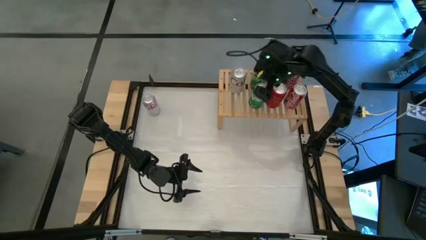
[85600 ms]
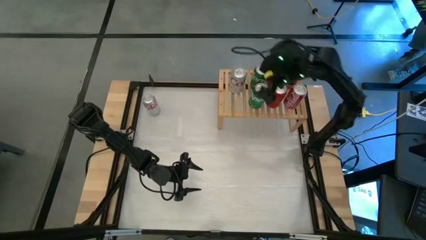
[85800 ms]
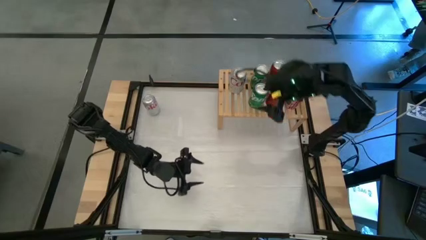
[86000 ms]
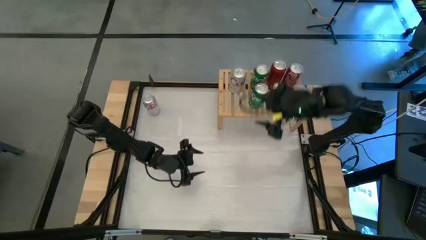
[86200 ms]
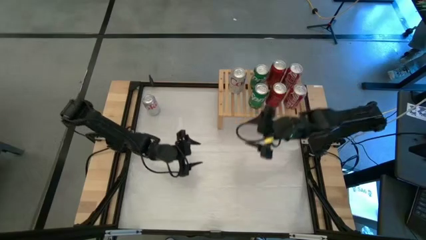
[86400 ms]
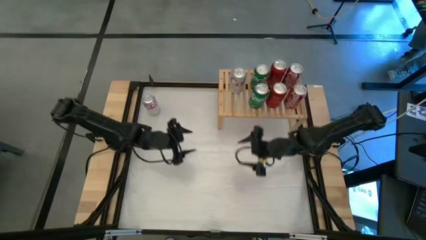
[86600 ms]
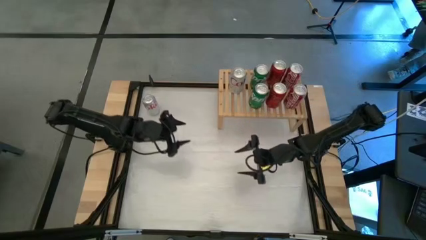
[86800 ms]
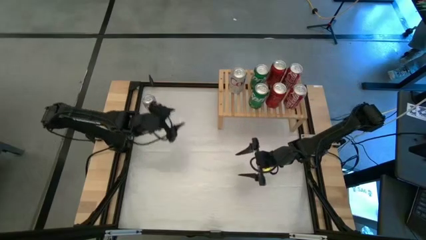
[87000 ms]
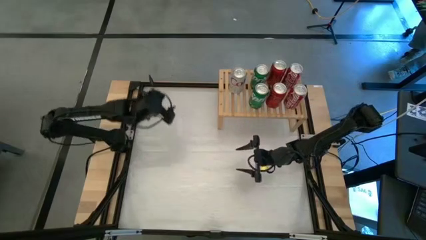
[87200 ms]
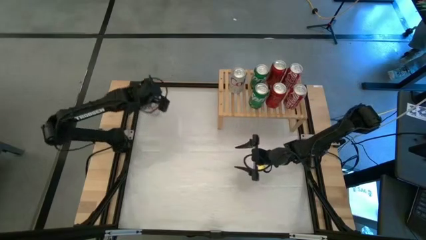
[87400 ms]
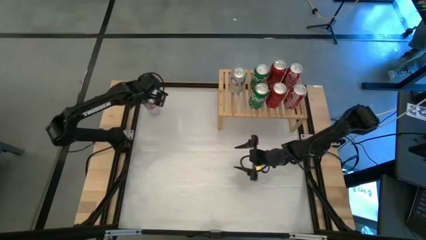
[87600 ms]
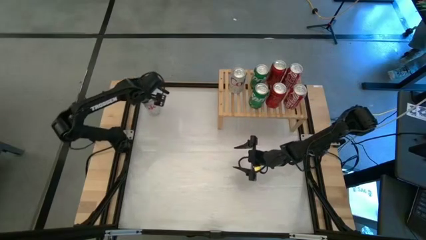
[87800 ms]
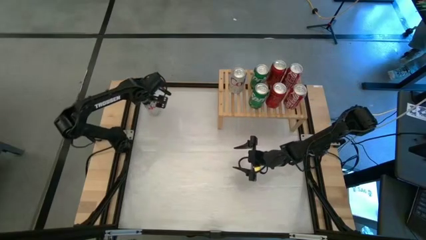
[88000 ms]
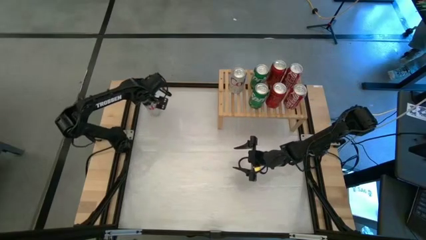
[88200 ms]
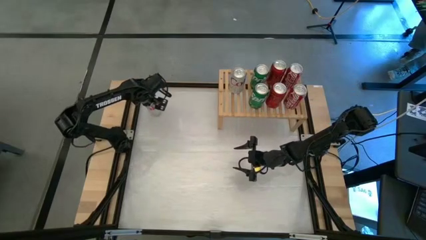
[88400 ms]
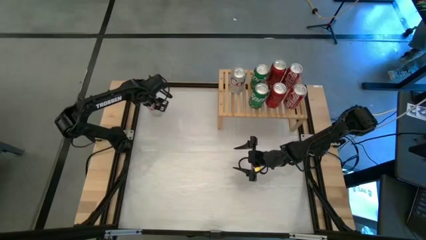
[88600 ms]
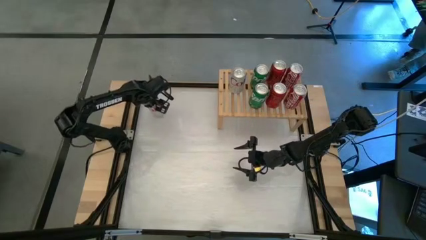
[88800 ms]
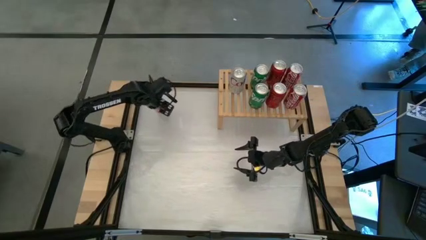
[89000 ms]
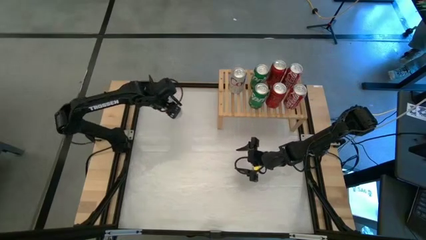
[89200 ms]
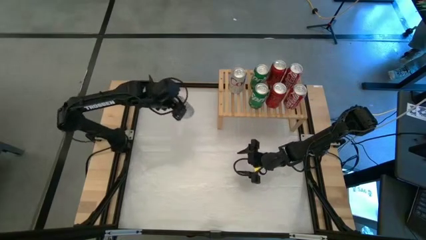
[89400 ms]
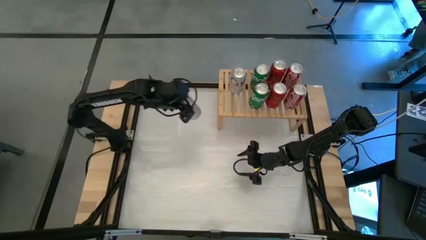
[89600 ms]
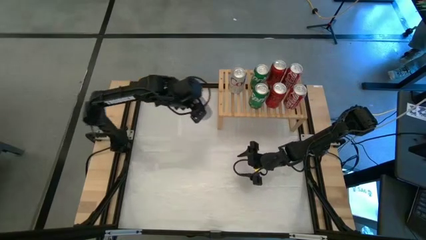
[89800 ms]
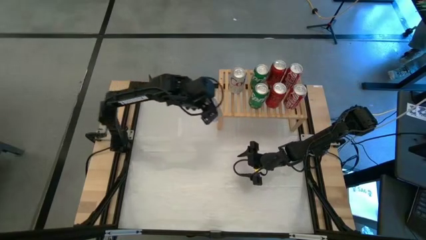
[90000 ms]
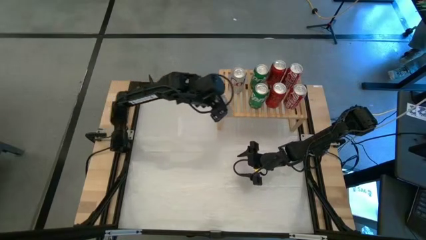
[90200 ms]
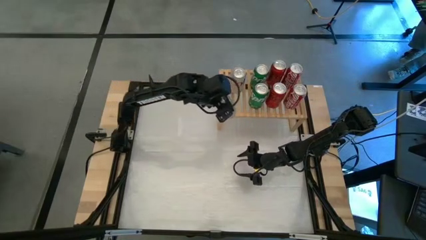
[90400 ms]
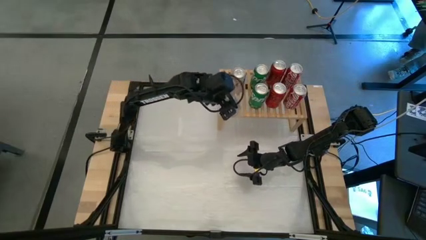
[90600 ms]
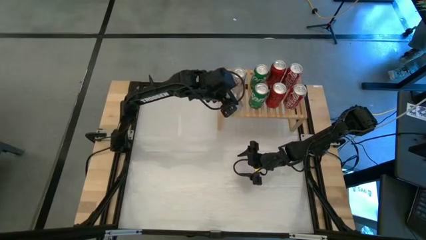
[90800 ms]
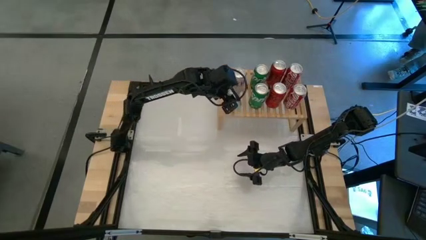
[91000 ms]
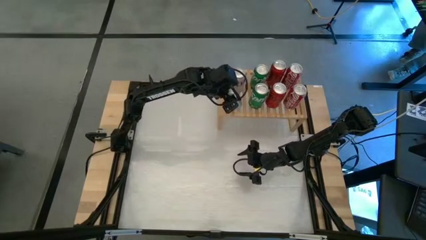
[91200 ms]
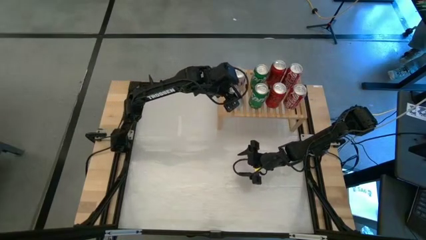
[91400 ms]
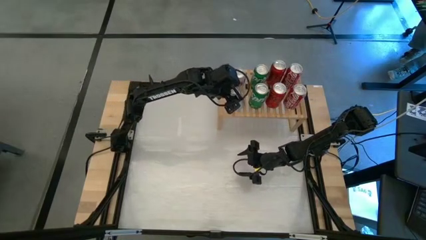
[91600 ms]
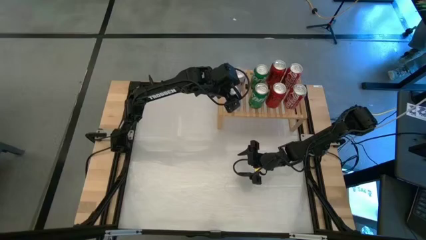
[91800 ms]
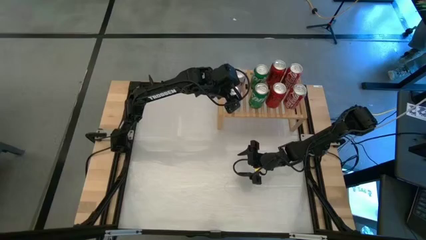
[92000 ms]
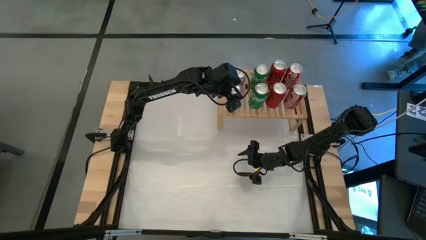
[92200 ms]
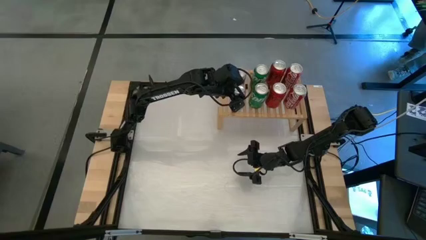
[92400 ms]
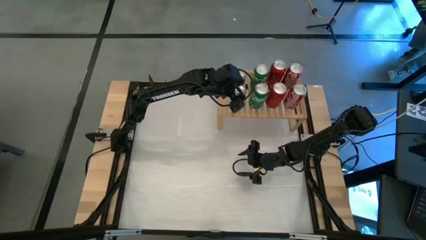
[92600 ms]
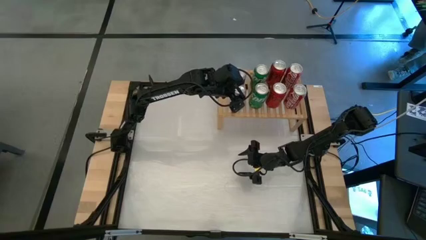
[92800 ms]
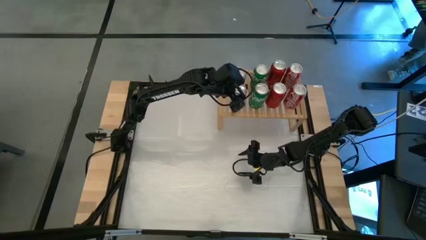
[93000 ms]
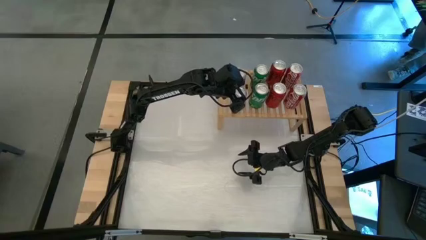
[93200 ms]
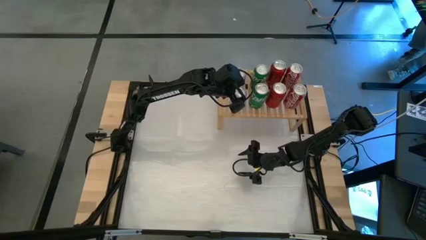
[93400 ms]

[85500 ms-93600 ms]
Task: Place canned beverage on shelf
Put the silver soda can on the shelf aligned with the other silver soda can

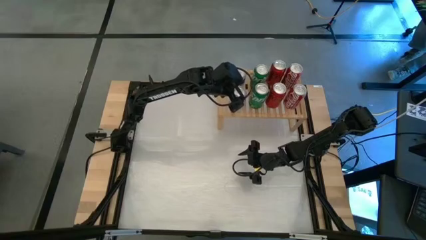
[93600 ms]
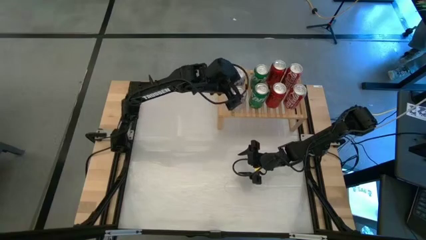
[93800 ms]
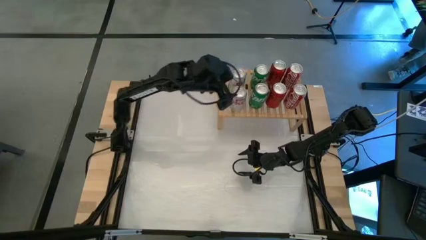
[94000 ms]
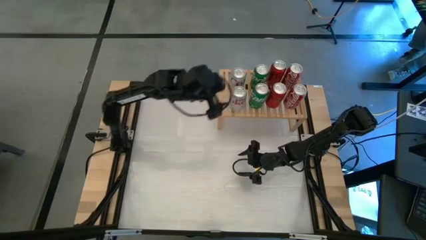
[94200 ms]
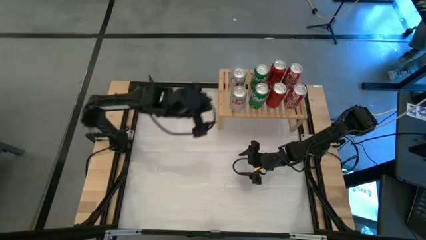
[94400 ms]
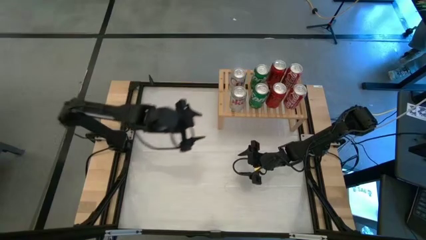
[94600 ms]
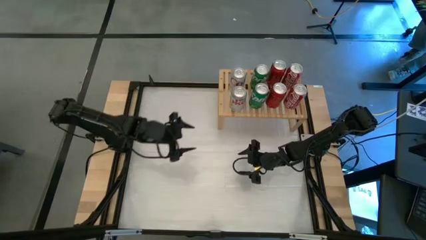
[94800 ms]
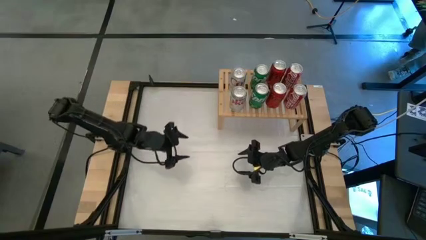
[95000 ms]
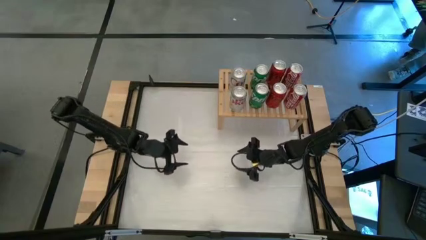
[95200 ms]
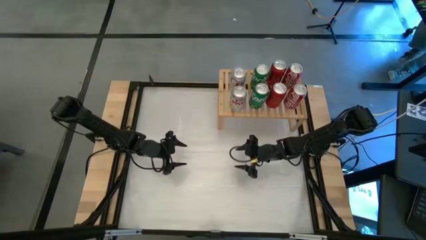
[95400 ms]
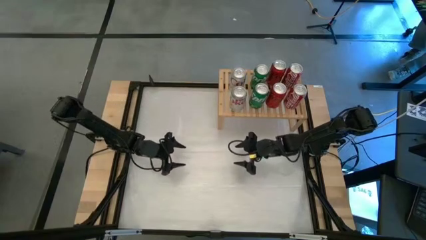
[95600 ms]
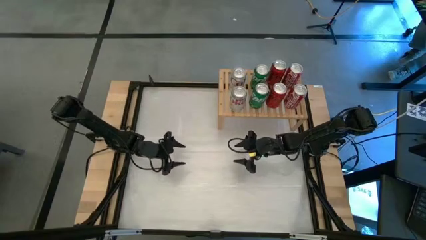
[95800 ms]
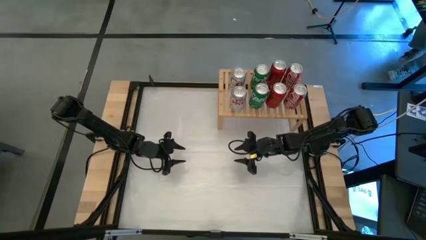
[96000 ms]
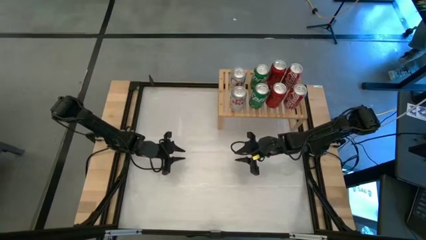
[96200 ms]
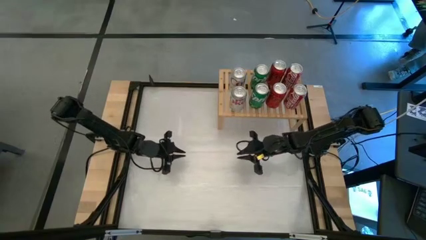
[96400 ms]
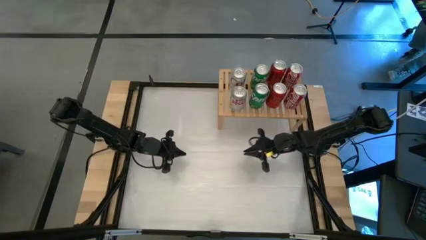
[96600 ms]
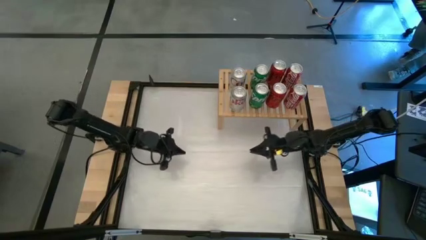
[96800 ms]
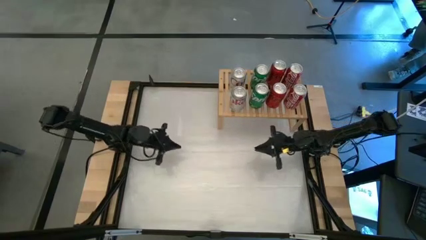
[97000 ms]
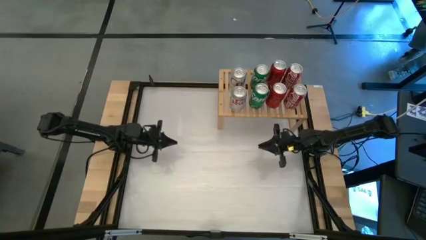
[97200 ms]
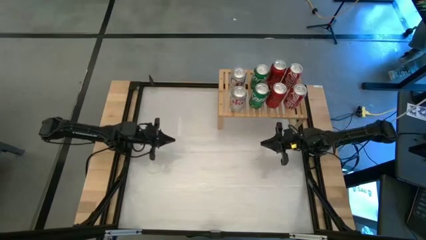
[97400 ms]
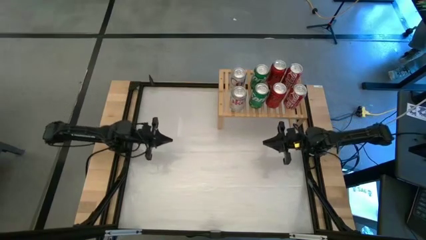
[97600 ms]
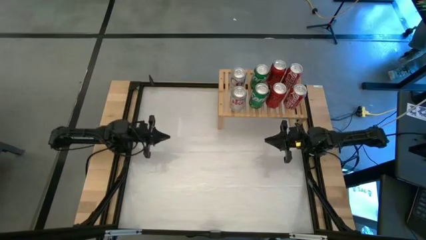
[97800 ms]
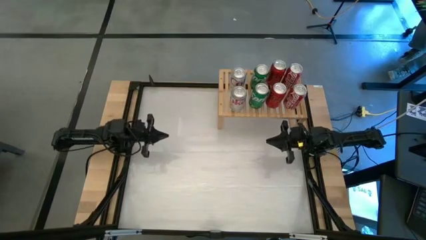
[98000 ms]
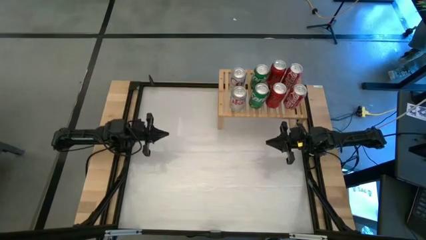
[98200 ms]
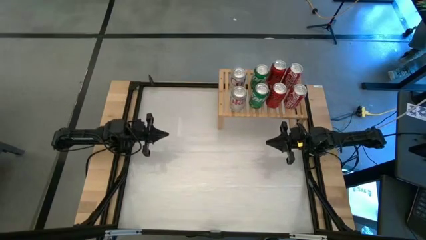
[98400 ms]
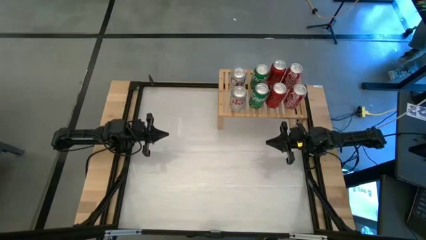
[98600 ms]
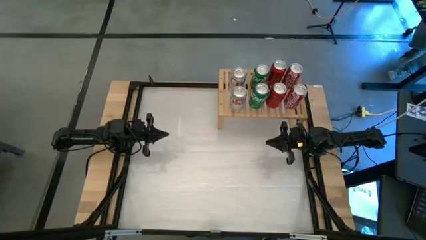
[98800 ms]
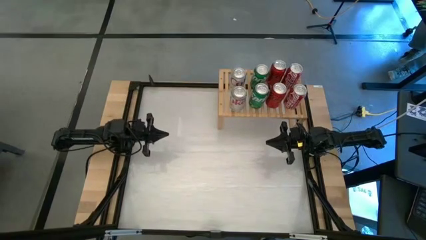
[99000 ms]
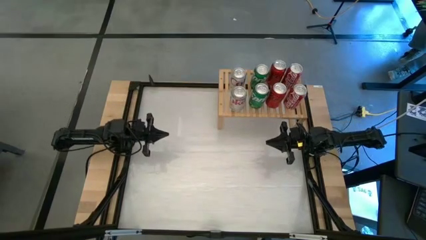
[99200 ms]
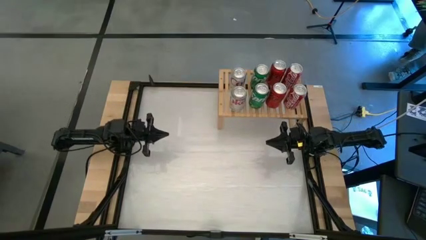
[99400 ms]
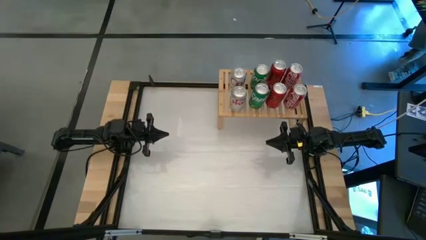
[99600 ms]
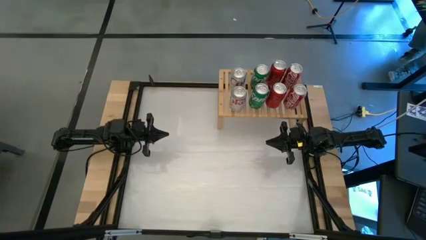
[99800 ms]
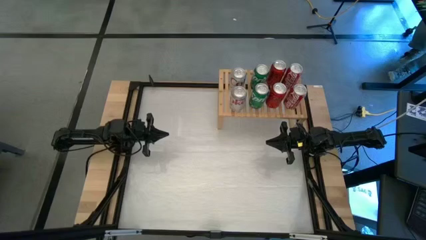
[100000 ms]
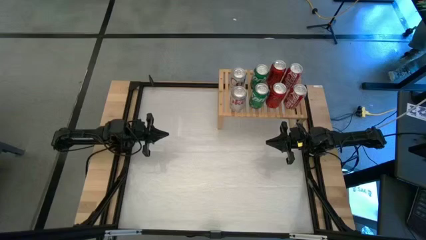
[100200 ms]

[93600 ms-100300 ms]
Return to Home Position

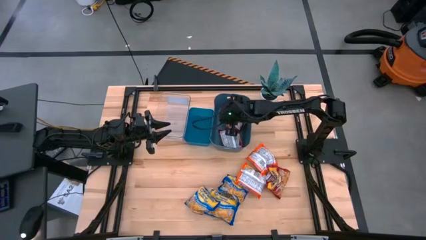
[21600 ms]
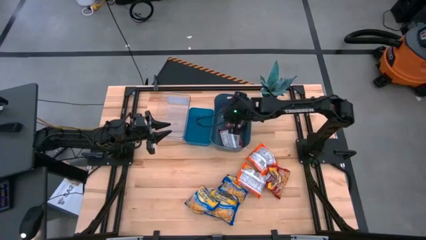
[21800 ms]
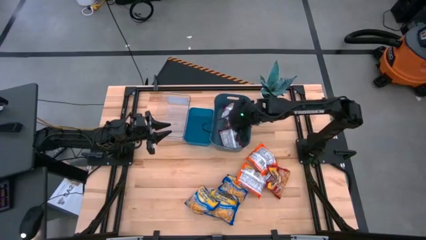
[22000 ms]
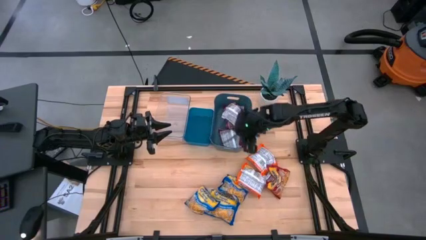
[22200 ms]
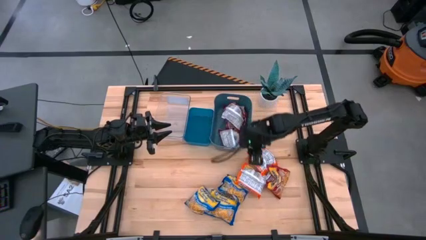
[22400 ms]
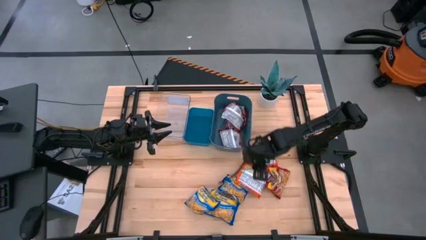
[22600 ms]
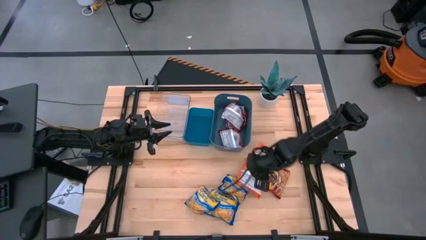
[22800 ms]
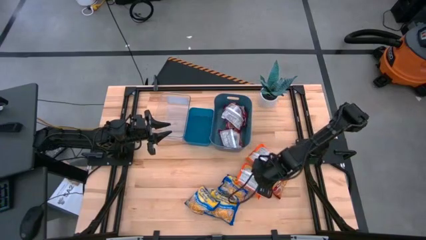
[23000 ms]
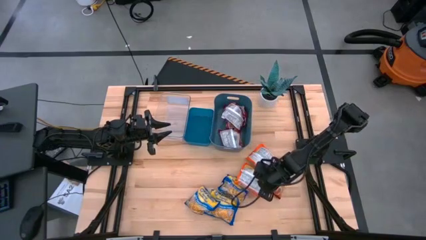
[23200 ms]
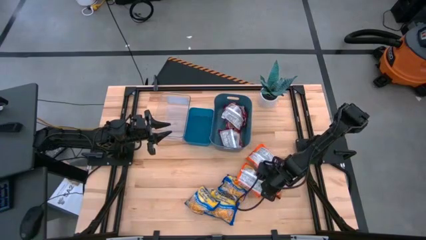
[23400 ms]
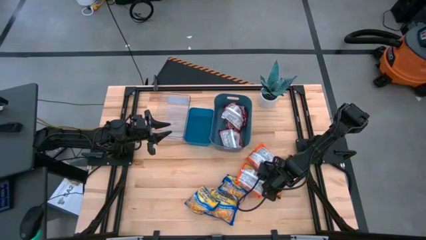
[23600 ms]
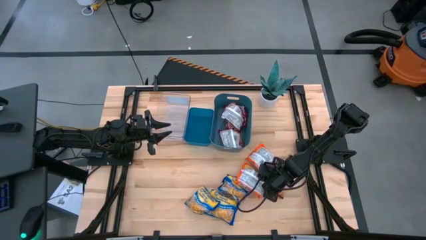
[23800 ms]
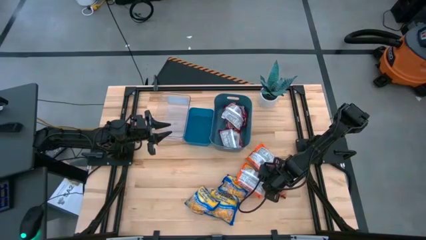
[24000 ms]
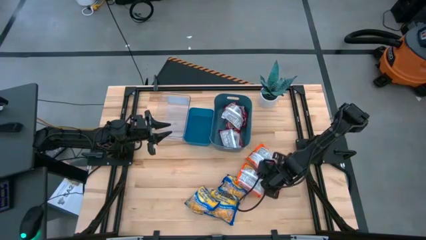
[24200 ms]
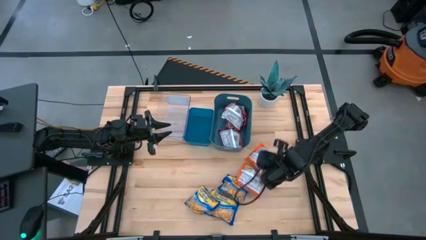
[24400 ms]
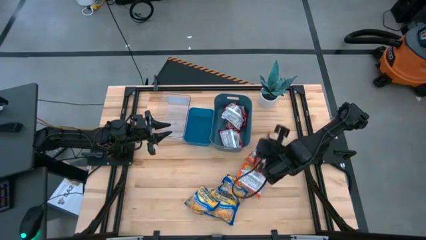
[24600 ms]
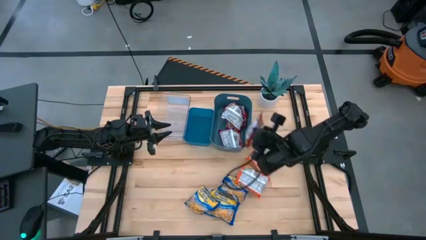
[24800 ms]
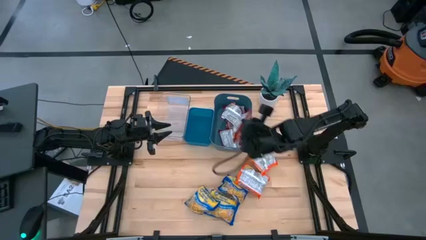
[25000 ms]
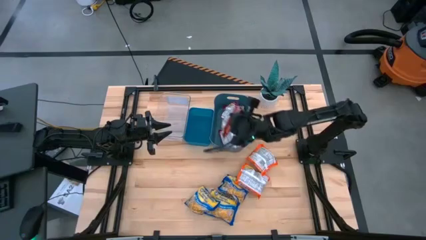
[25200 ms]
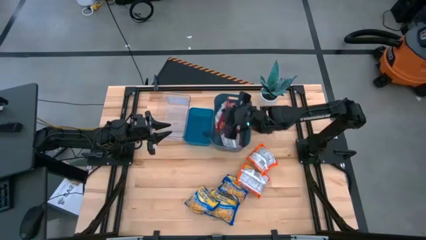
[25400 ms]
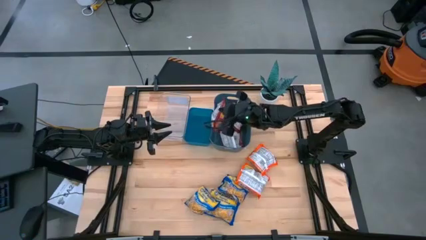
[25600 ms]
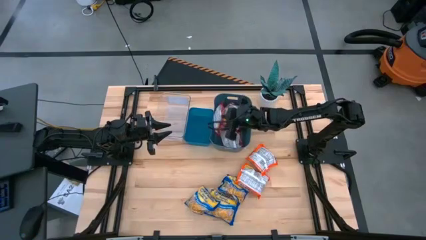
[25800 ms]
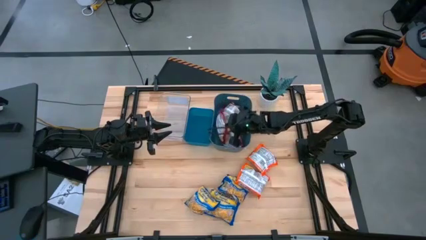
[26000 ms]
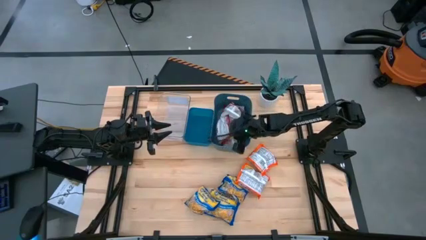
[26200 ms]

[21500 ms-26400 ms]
Task: Sort Maruchan noodles
Put the red noodle pack into the green bin
